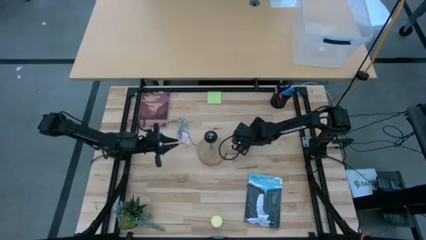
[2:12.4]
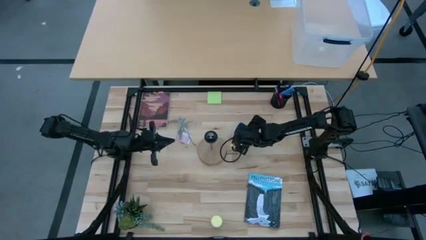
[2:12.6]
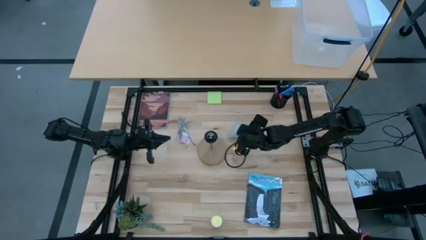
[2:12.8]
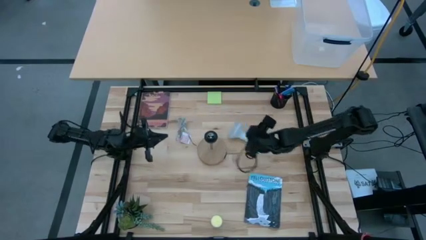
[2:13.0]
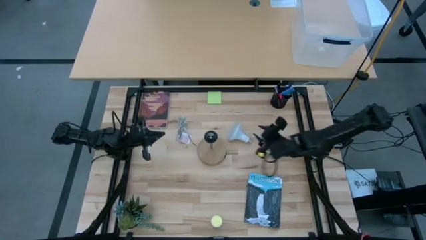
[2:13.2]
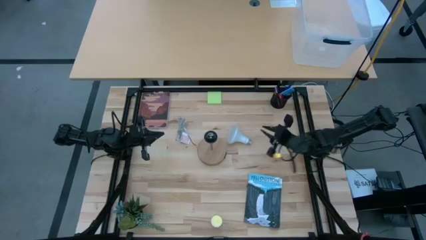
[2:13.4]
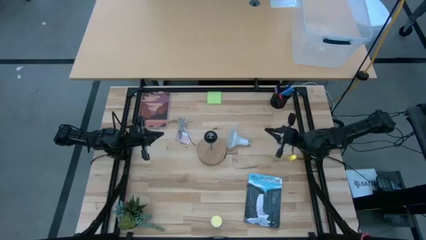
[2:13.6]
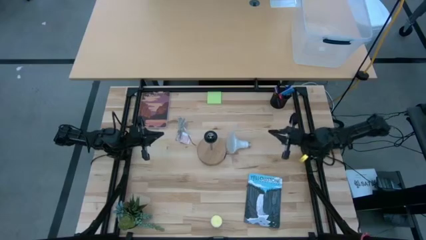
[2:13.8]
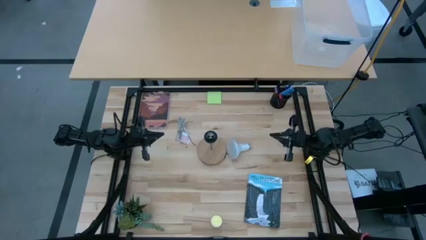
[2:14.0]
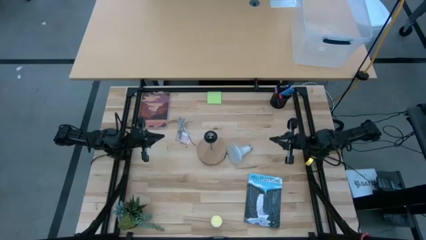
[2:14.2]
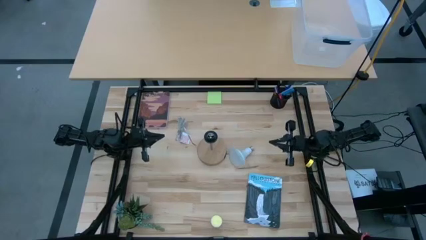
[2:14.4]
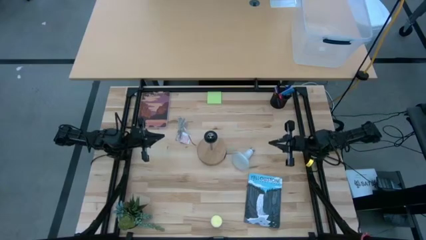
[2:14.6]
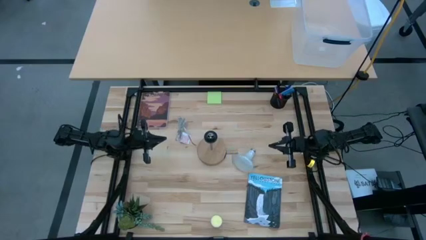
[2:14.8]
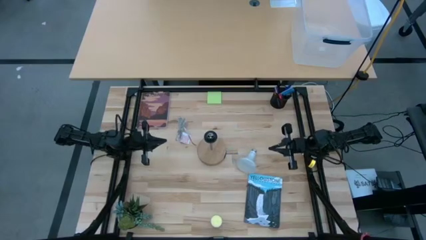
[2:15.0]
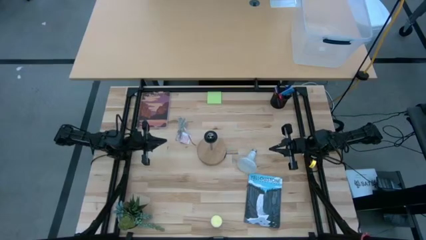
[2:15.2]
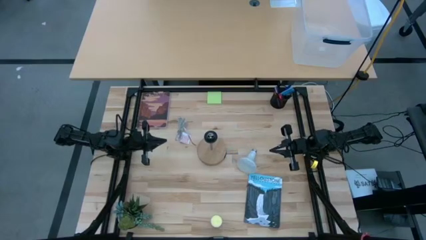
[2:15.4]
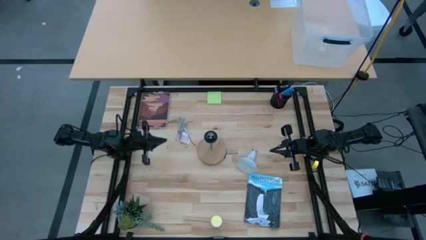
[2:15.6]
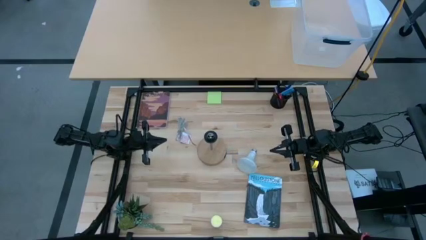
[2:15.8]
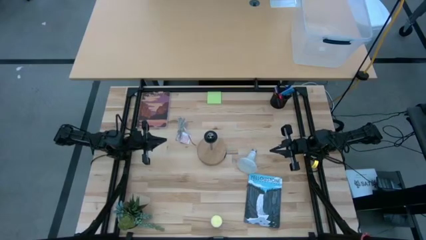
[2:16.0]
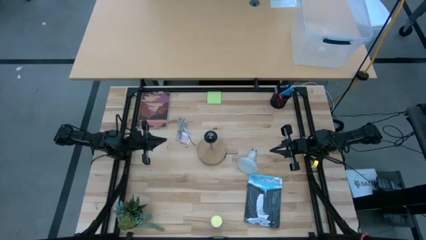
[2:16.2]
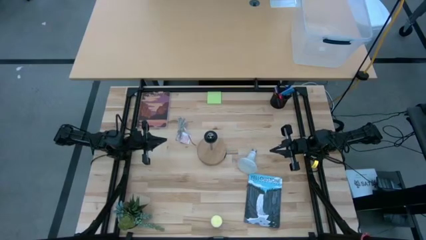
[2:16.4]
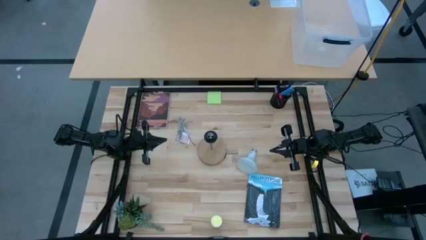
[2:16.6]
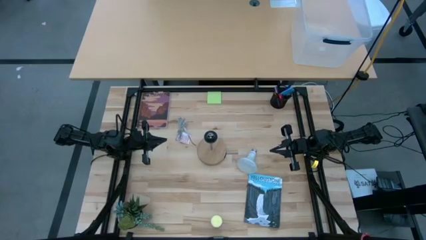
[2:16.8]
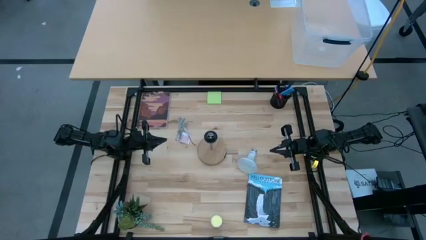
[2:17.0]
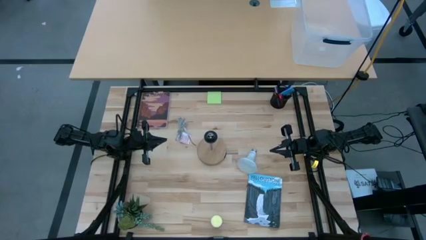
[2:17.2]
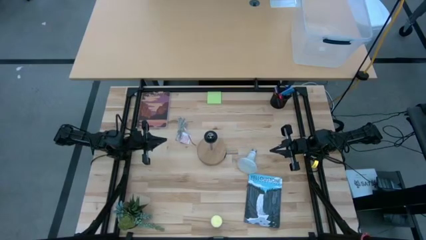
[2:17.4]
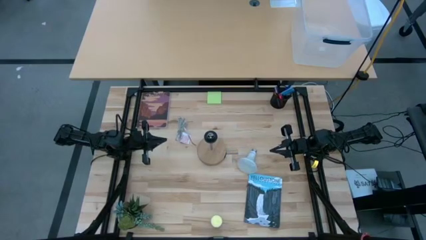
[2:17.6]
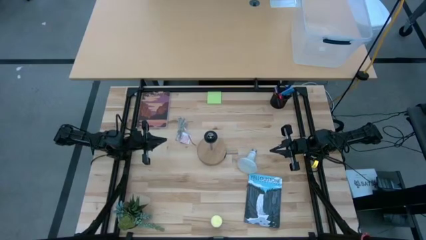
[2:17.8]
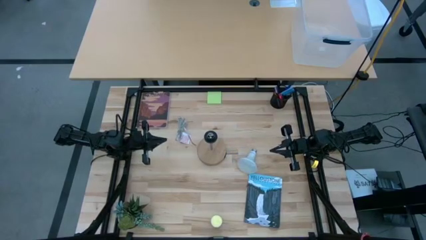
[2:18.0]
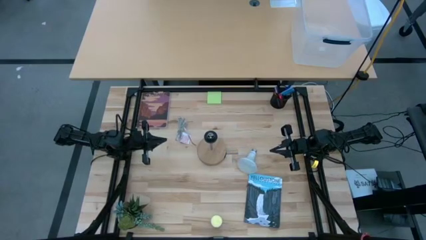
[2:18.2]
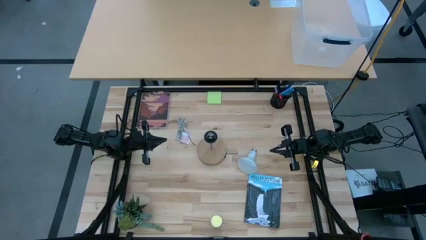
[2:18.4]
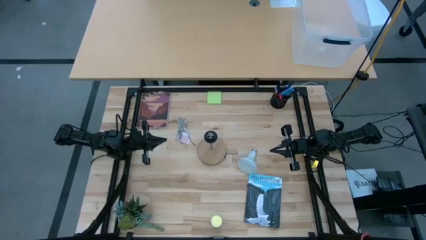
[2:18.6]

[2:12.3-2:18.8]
Task: Screw lightbulb
Return to Home Position
